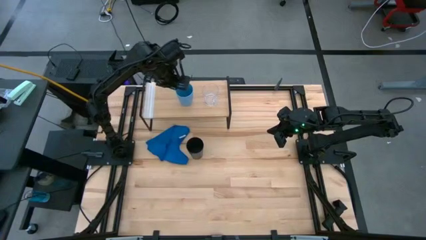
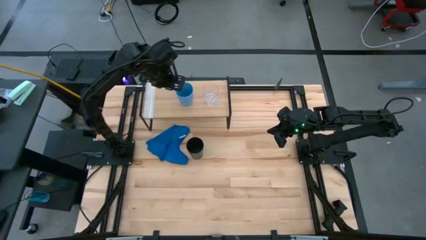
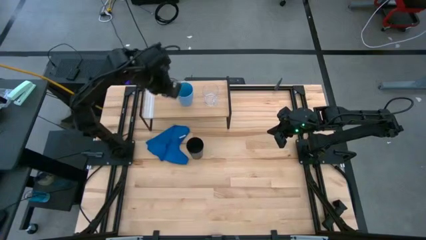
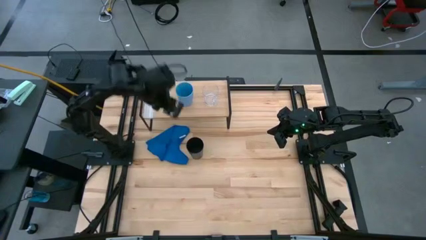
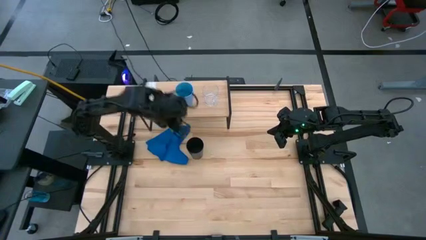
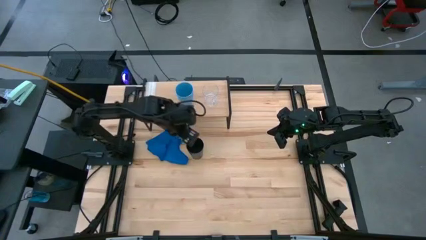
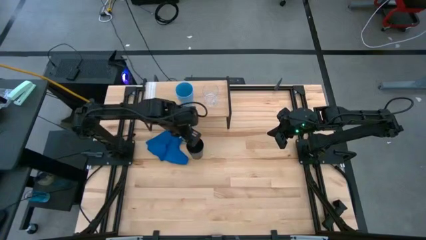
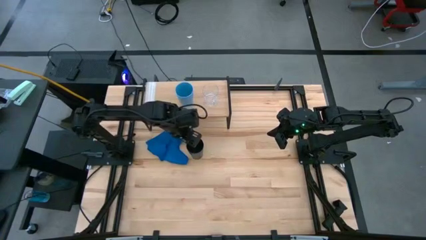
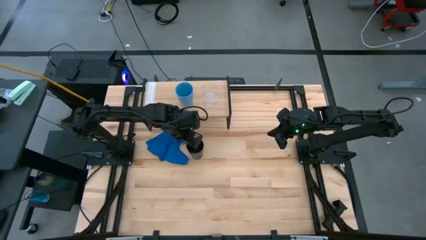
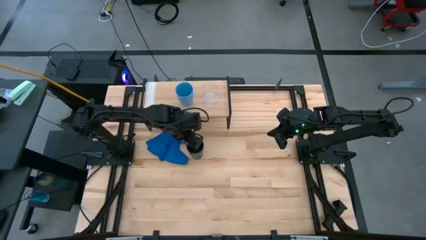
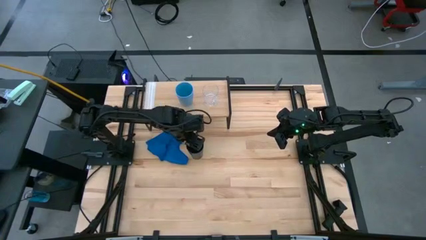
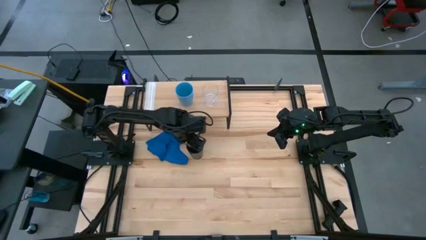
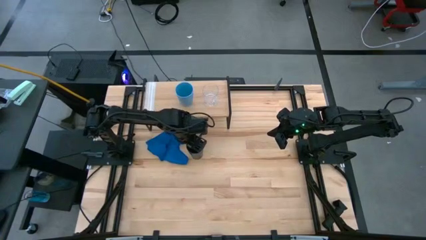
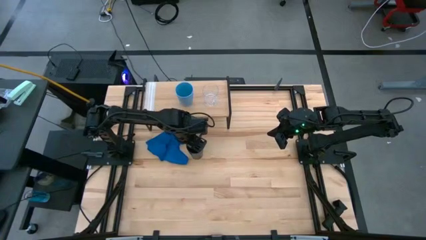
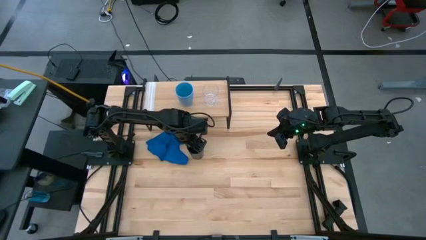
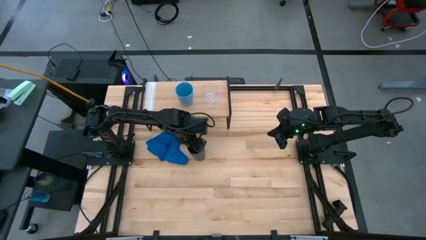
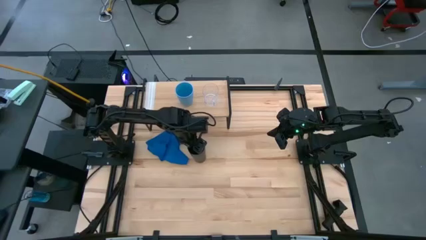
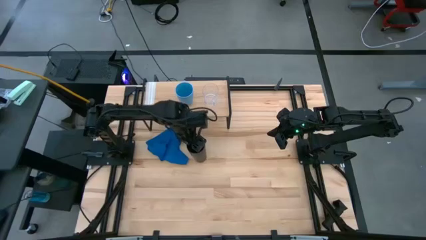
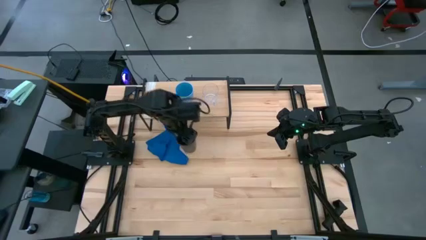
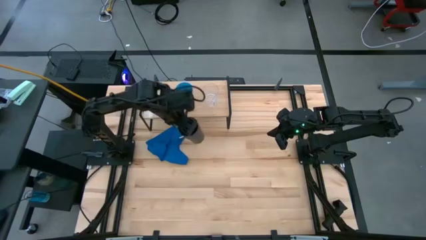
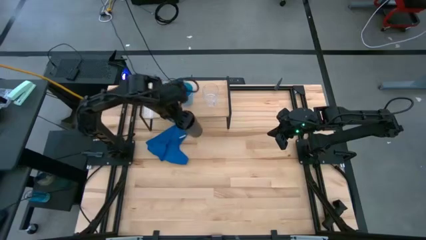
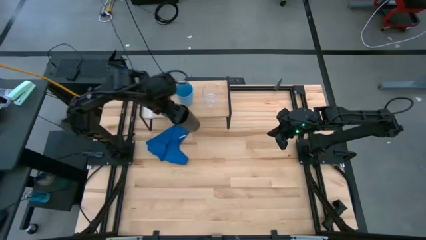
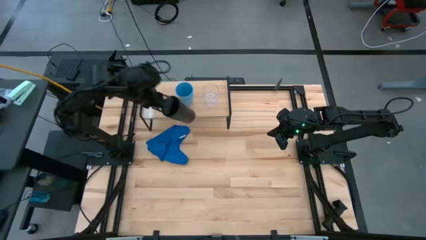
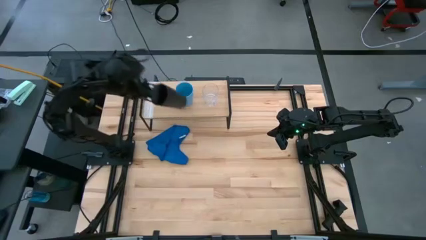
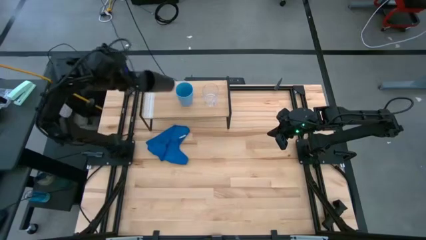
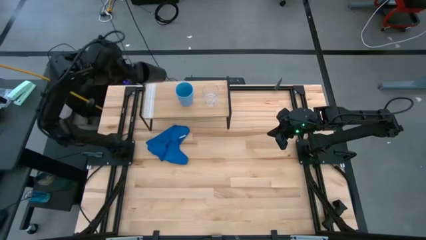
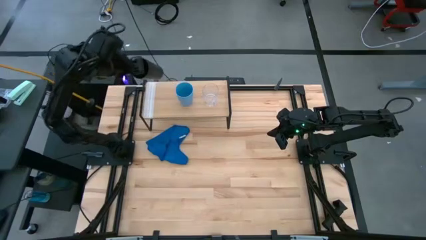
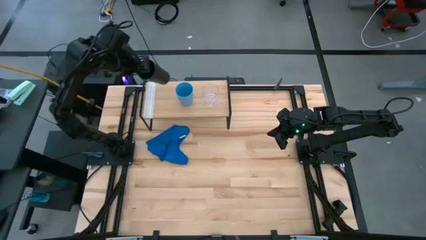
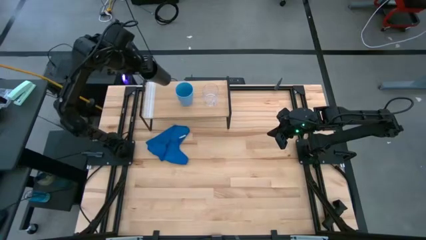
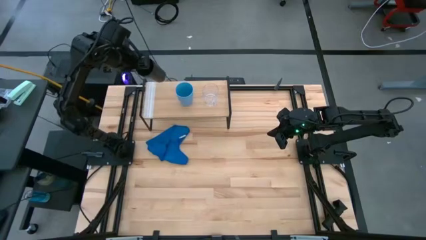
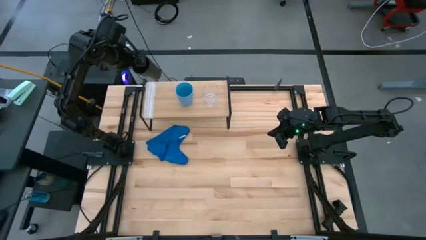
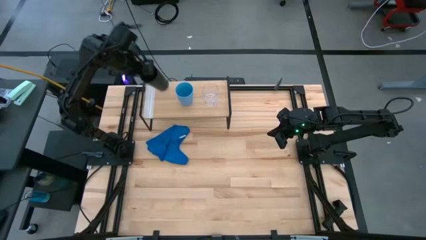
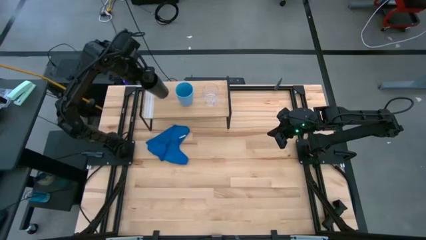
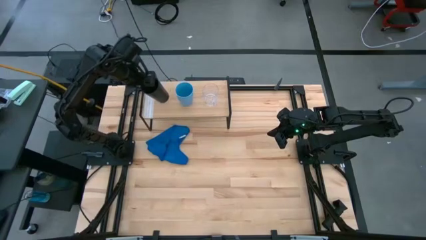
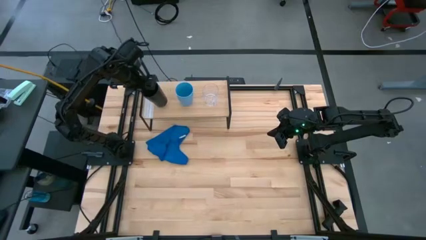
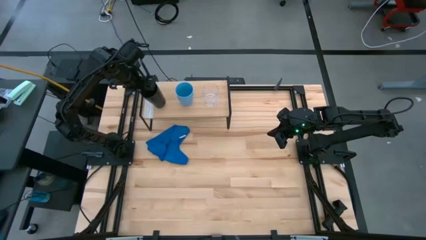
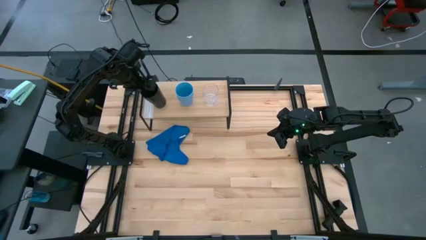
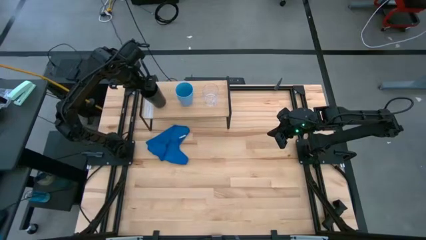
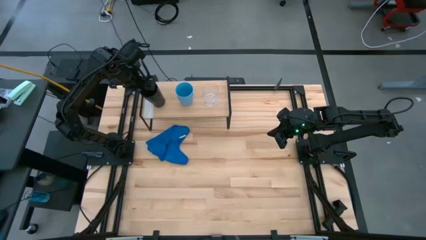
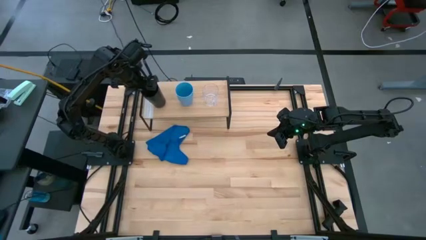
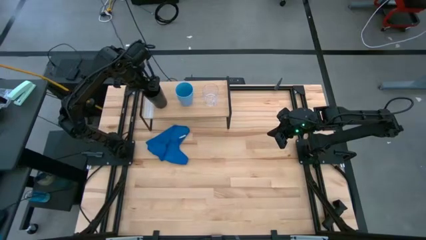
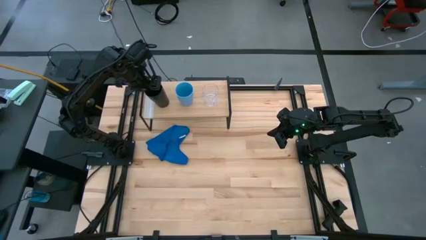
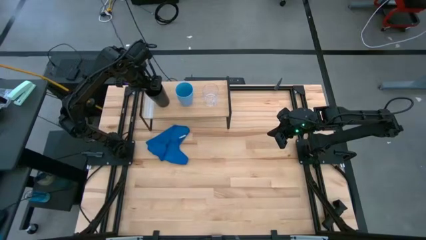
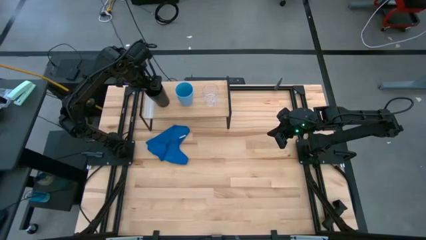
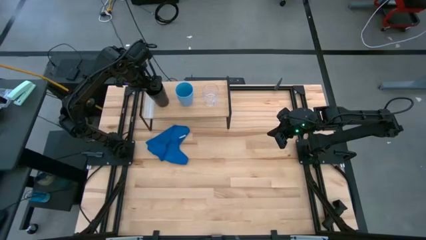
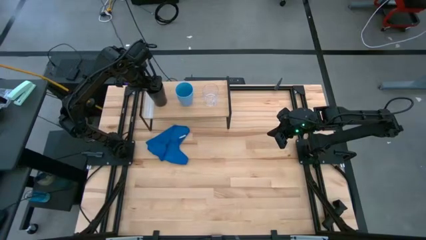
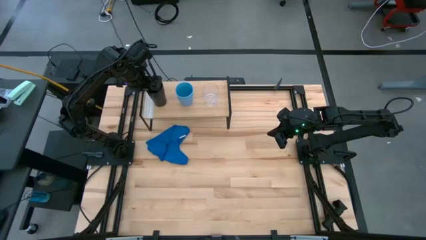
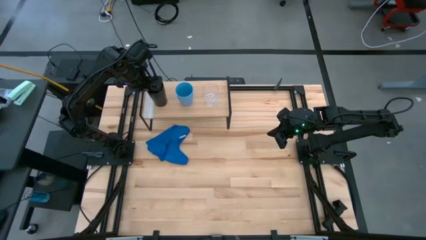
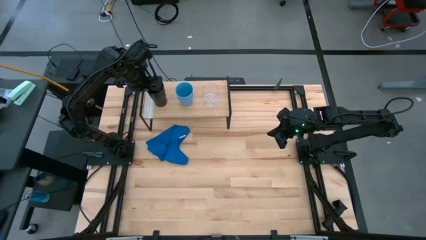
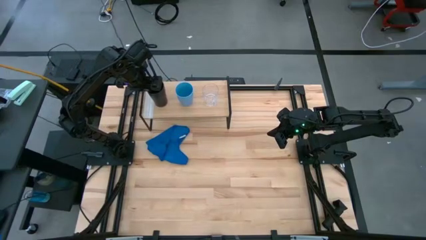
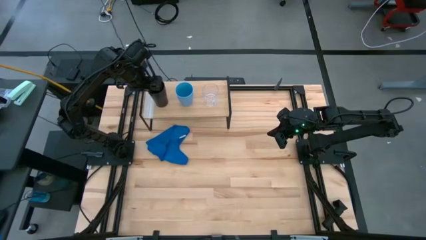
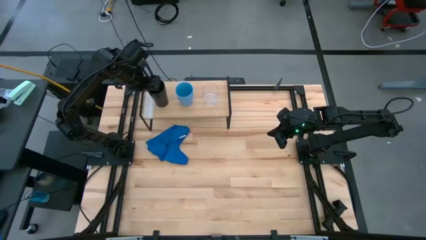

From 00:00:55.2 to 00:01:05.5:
Task: Stack small to large cups/mugs on shelf
Put the black cup on the shelf
